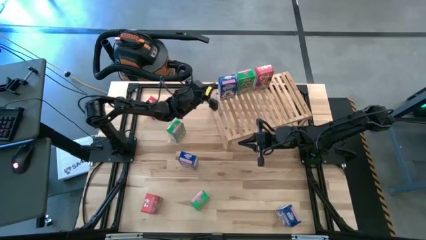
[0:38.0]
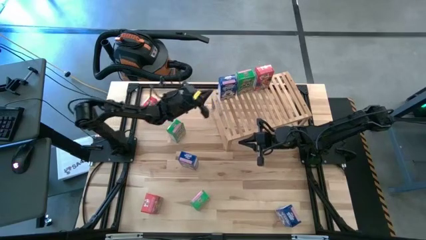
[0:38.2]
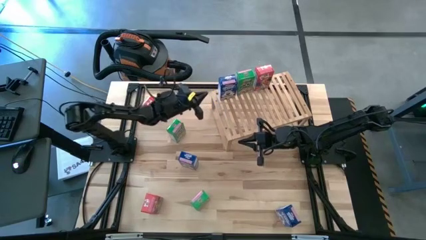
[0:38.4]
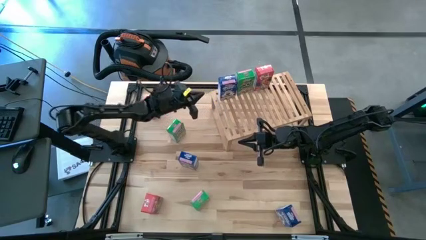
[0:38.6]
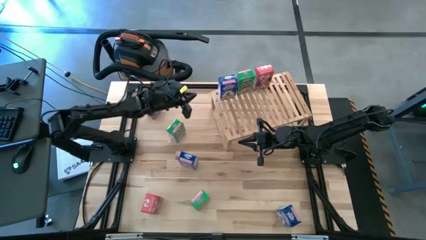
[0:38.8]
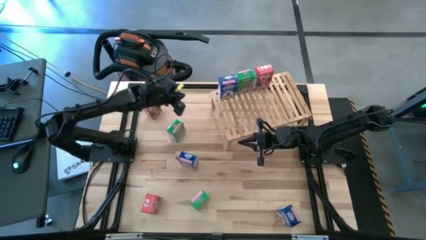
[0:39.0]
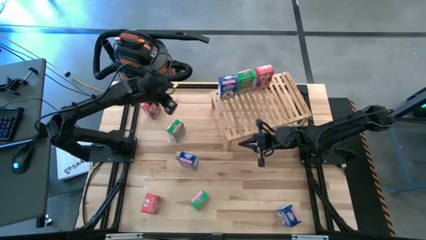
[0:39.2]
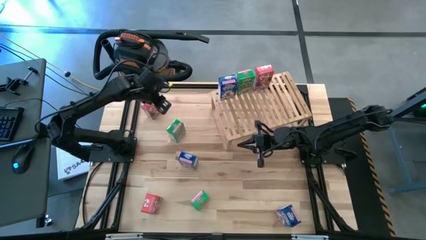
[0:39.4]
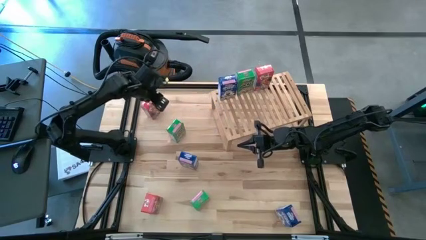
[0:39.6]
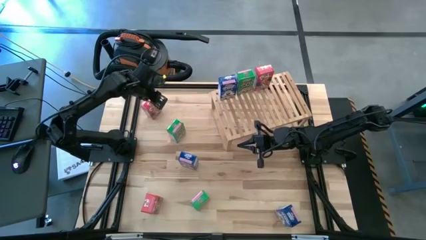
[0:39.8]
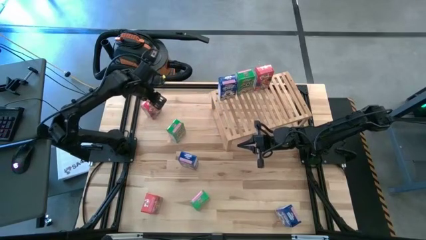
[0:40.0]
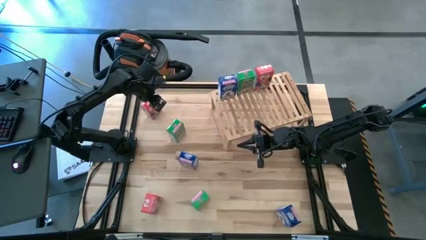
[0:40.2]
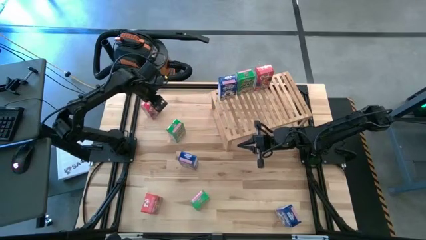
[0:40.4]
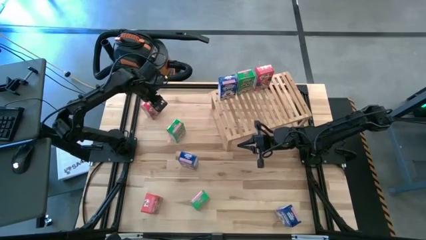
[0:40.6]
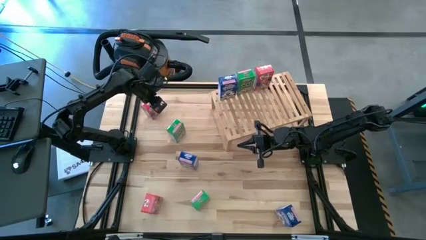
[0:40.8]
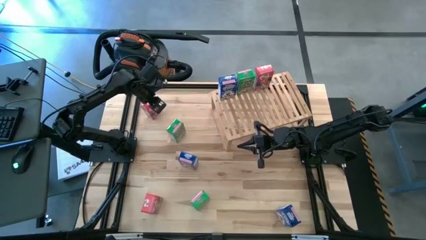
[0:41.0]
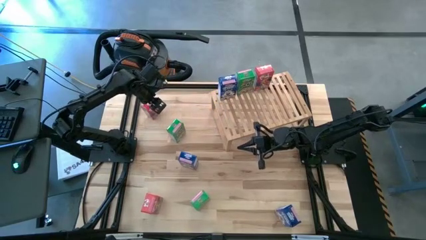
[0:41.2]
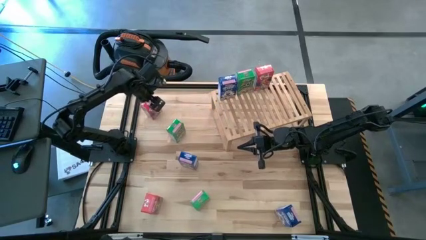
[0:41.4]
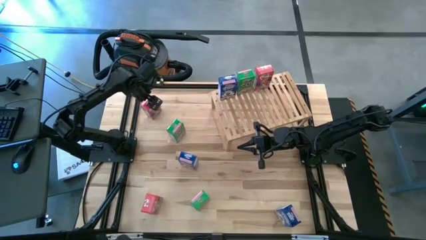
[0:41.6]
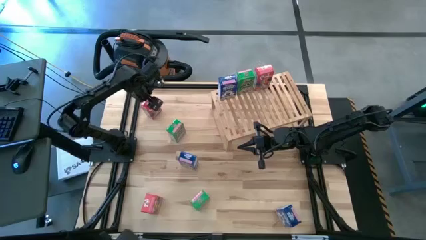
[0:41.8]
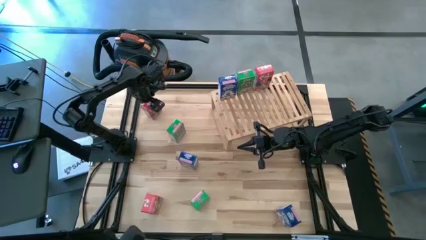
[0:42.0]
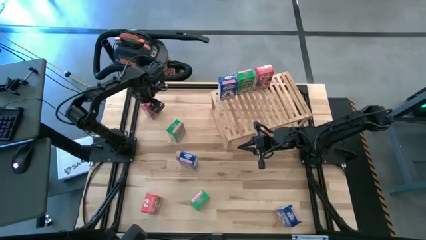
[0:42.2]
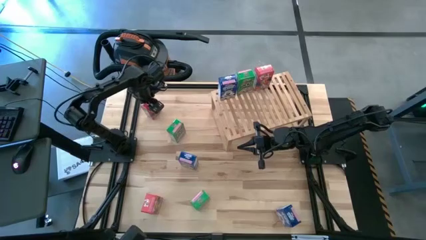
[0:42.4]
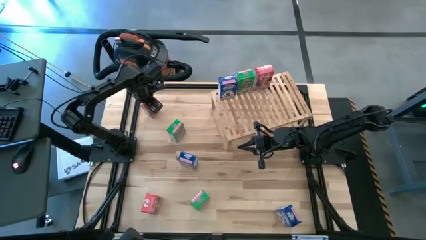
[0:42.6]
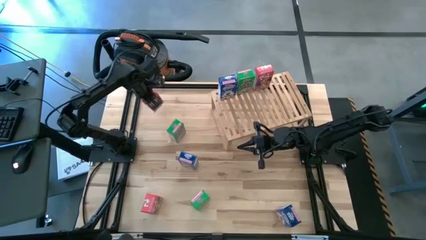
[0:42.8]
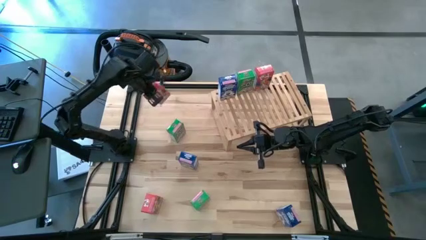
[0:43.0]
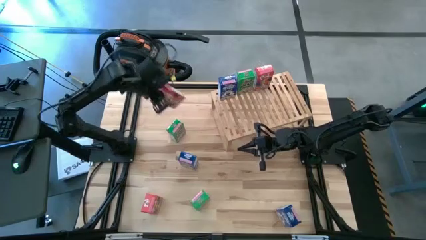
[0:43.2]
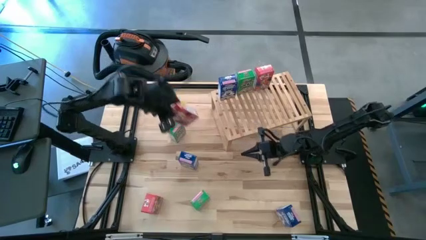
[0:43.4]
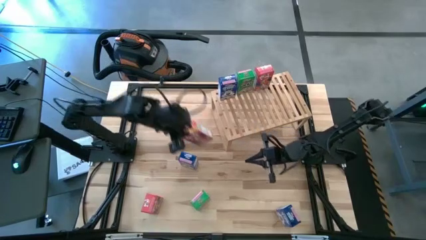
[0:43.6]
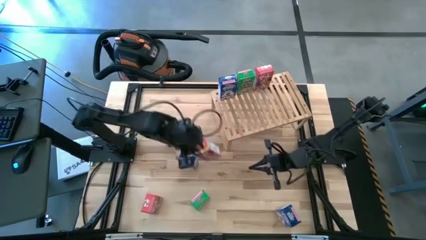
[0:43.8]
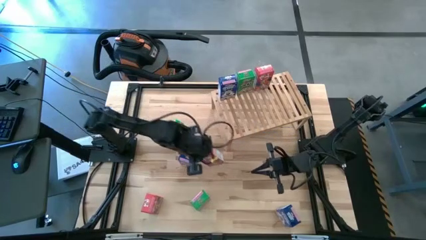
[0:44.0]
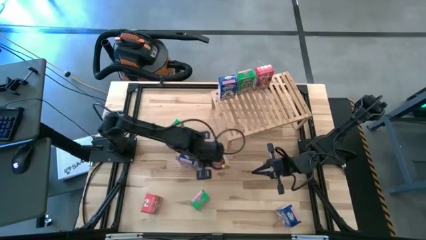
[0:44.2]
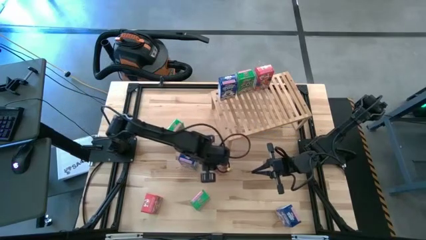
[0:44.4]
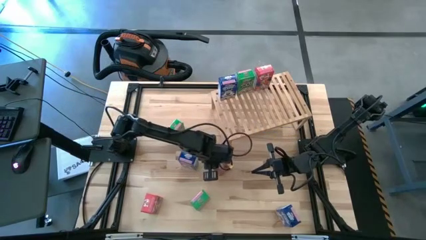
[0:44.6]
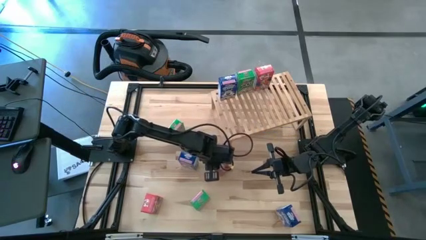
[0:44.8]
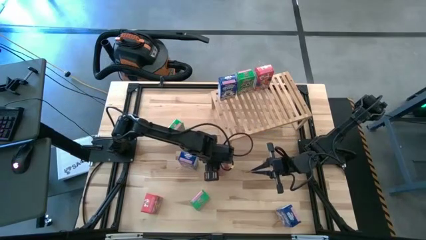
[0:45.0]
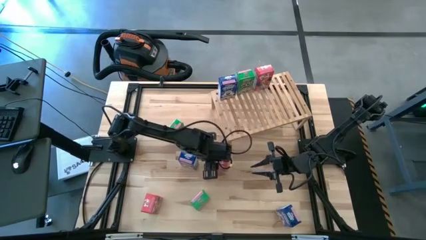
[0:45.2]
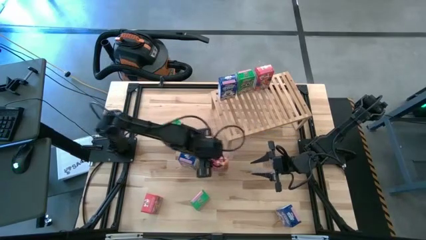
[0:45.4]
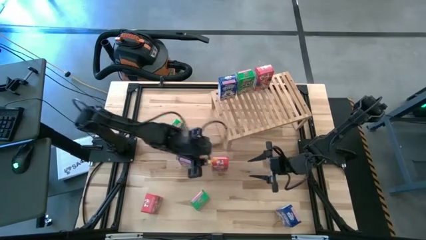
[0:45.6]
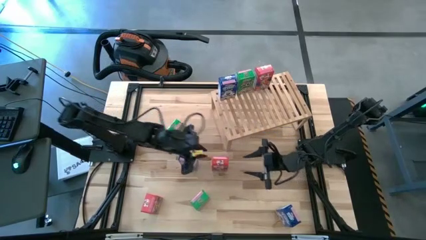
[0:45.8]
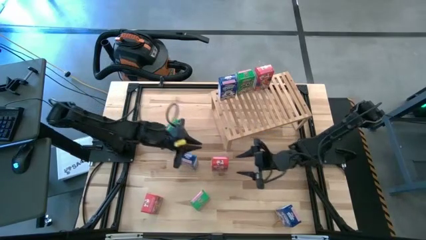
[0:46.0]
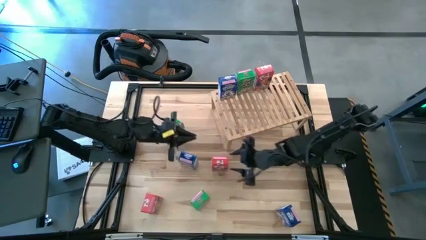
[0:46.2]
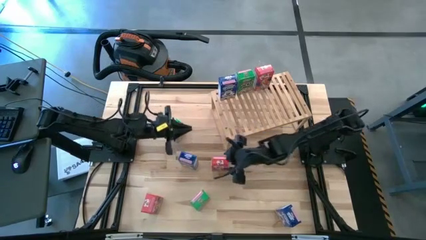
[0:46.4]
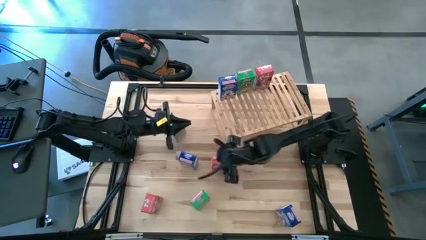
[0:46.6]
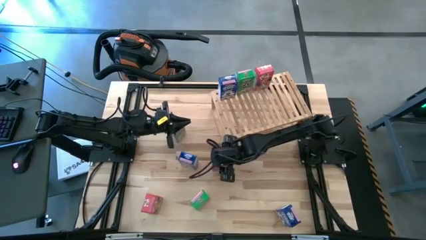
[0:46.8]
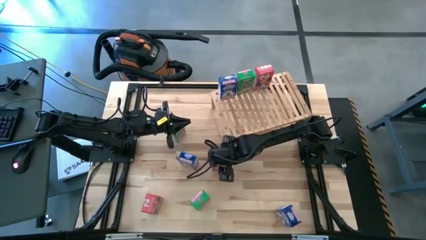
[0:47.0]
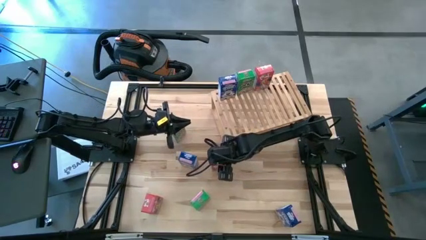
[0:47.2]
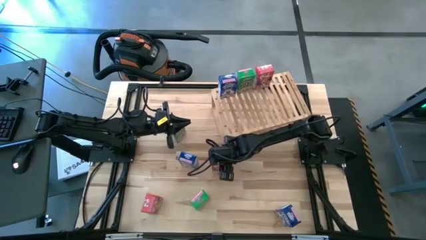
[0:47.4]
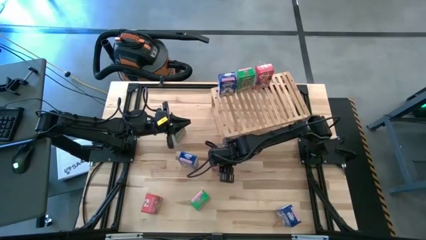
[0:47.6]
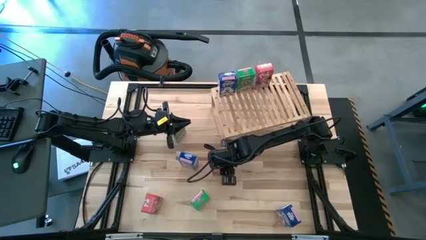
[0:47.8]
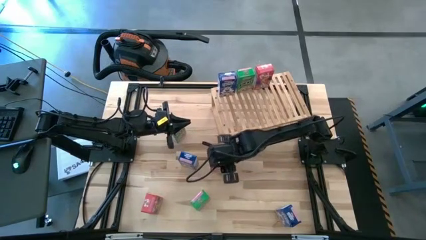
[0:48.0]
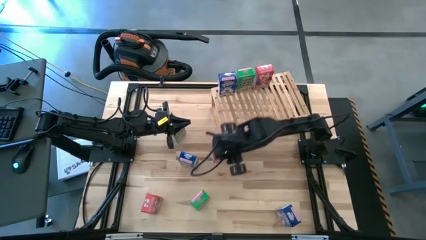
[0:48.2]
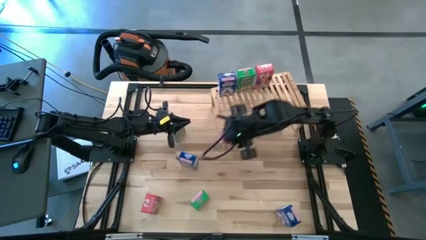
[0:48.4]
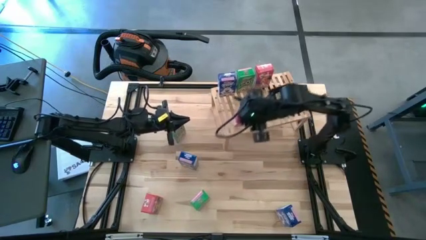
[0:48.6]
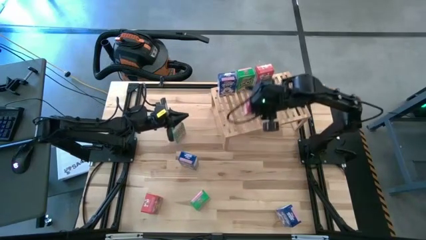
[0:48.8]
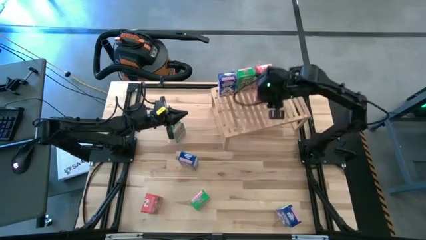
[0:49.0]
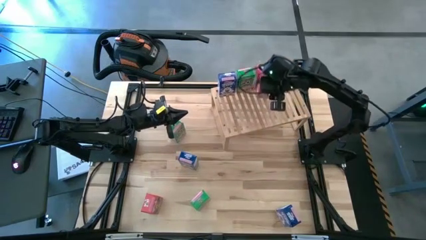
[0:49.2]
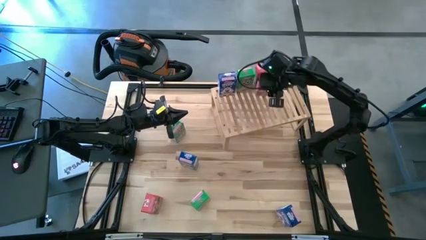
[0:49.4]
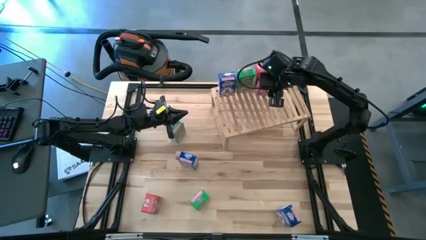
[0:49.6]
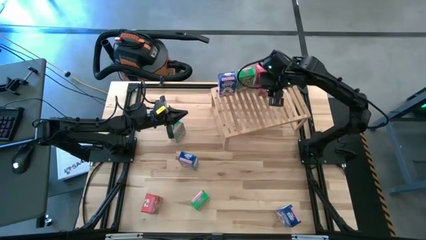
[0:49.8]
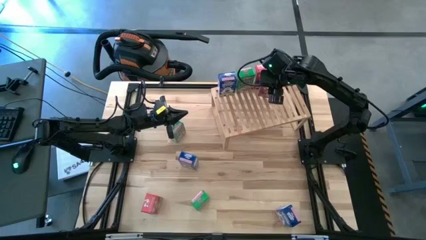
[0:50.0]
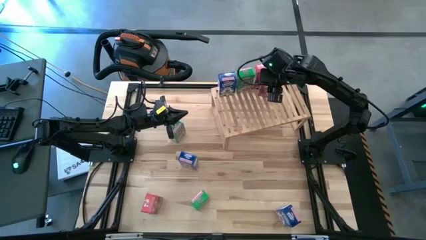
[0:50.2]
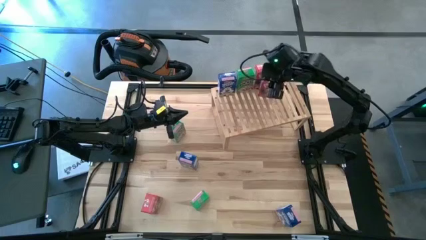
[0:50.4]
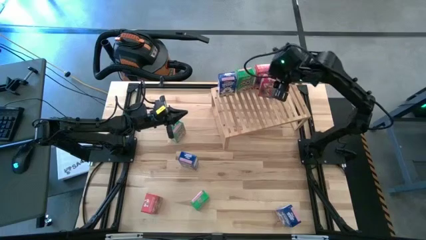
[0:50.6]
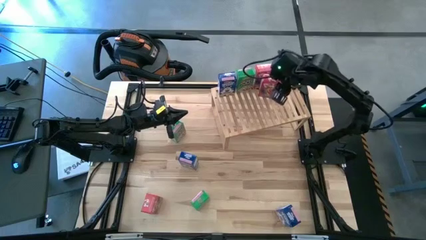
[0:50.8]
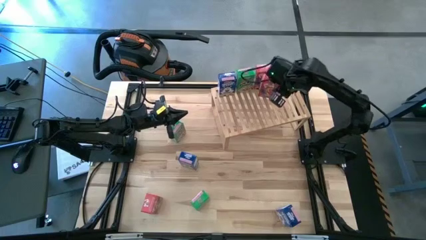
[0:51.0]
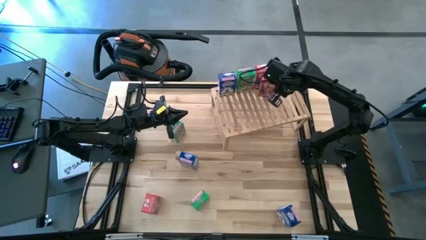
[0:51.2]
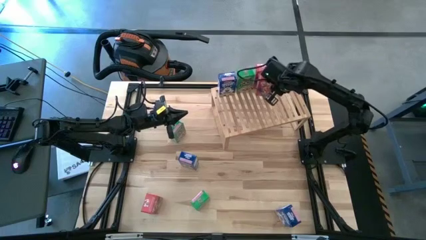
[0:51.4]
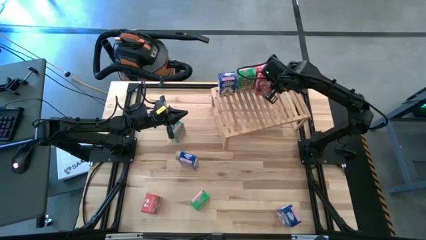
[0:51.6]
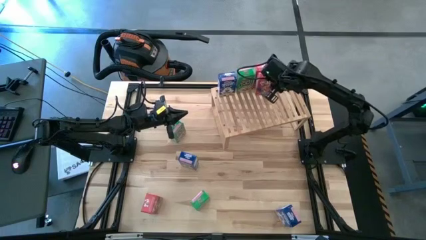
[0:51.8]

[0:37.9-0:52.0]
Task: Stack cereal on shelf
Put the top red cereal box on the shelf aligned with the other red cereal box
